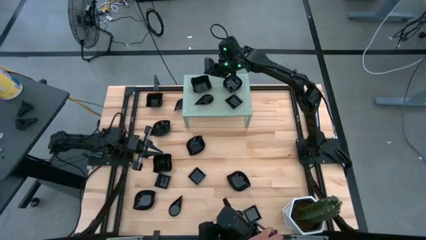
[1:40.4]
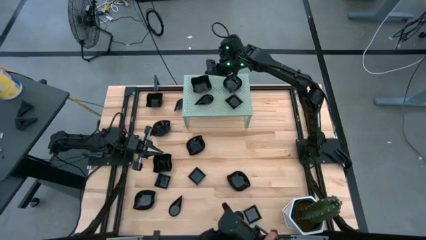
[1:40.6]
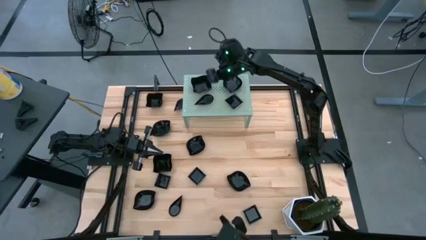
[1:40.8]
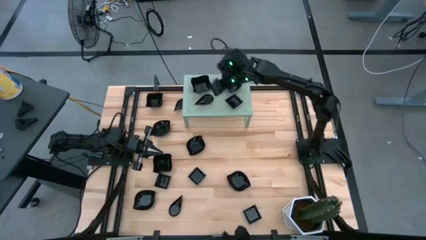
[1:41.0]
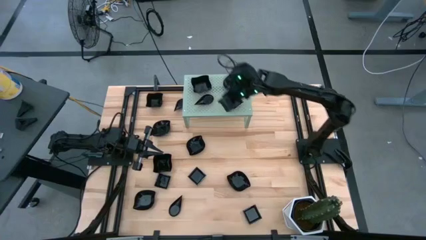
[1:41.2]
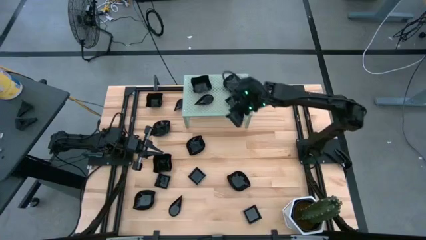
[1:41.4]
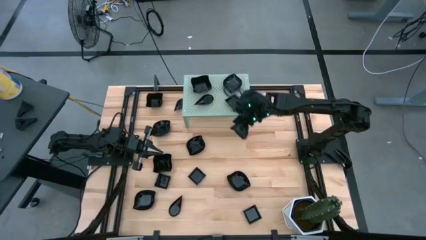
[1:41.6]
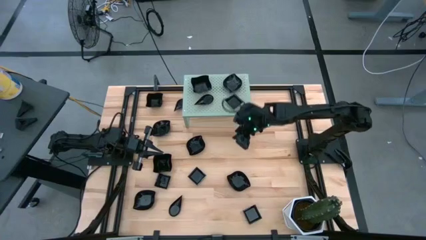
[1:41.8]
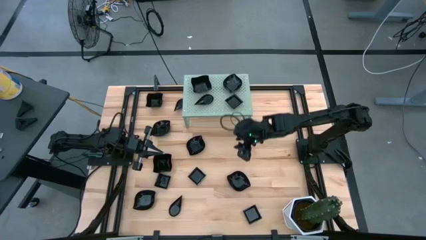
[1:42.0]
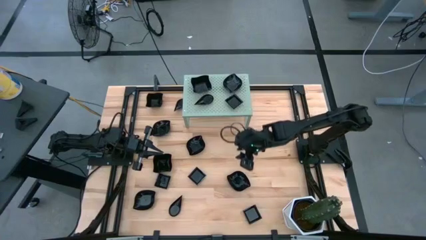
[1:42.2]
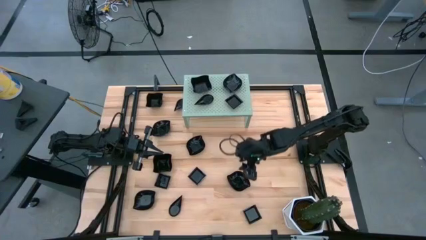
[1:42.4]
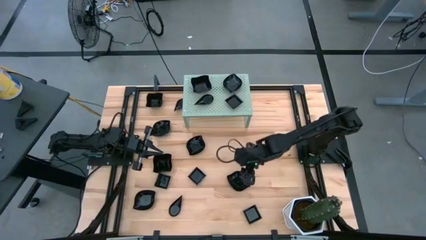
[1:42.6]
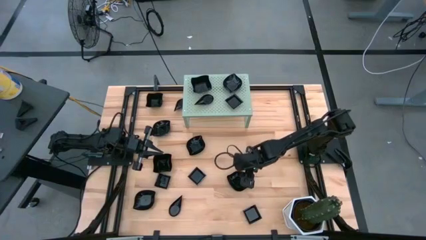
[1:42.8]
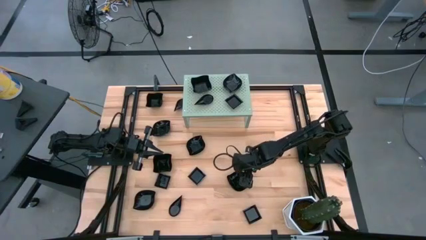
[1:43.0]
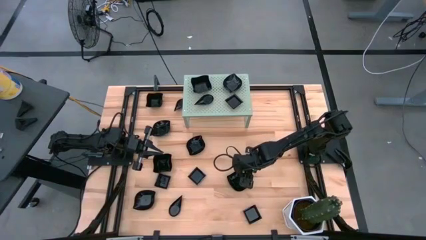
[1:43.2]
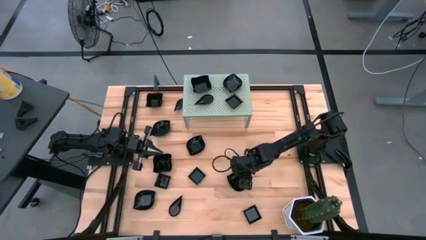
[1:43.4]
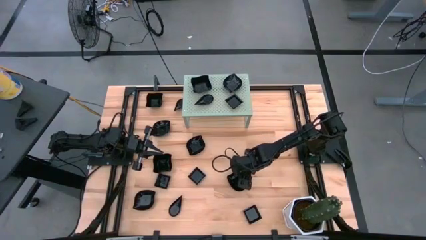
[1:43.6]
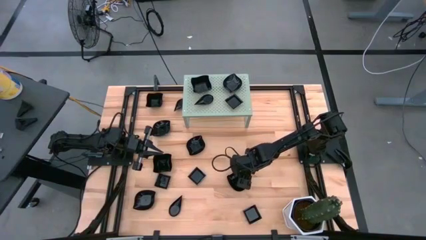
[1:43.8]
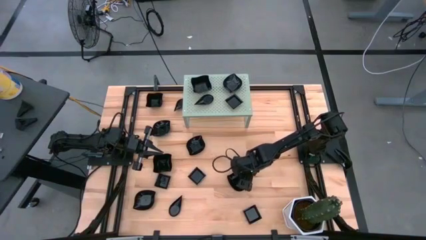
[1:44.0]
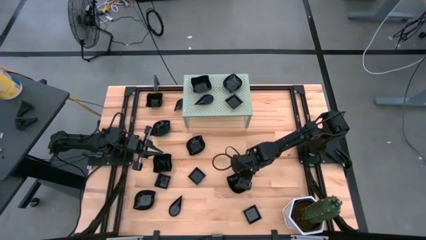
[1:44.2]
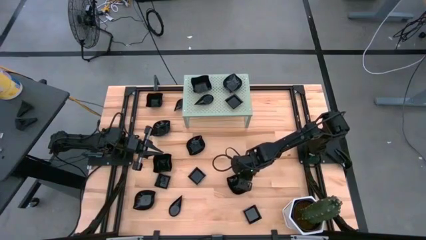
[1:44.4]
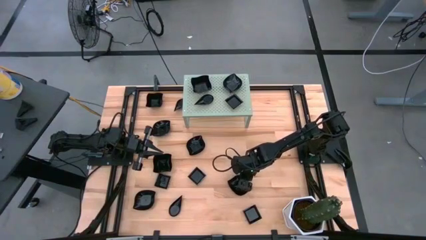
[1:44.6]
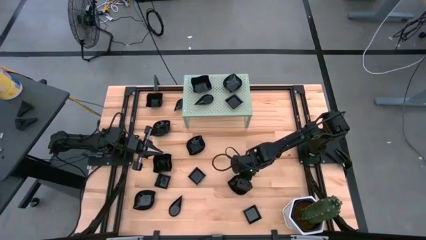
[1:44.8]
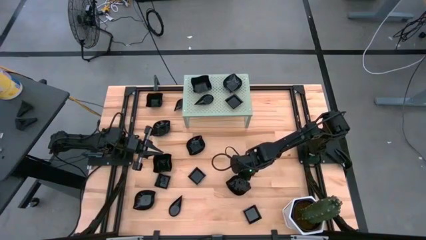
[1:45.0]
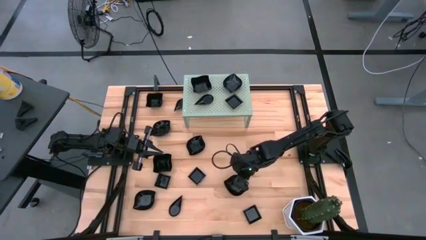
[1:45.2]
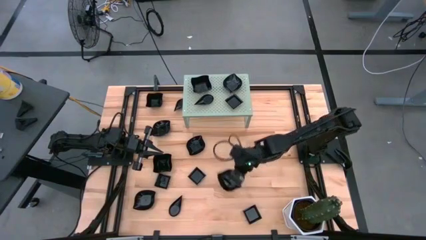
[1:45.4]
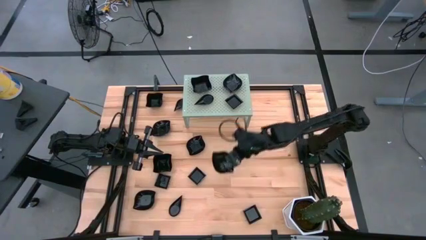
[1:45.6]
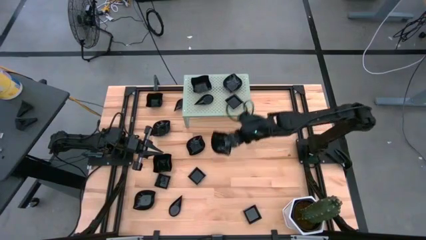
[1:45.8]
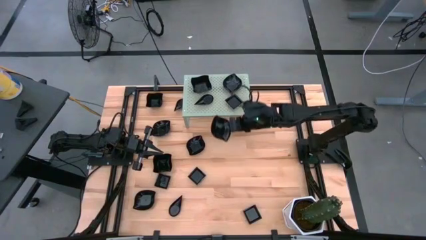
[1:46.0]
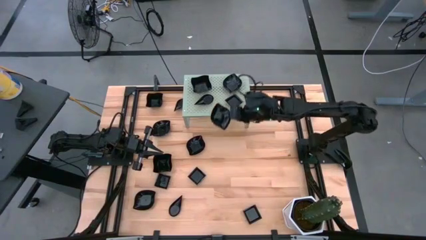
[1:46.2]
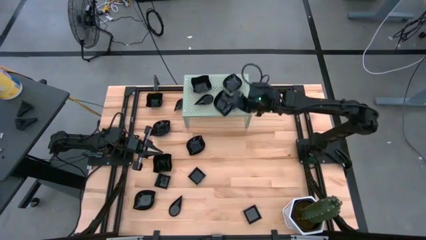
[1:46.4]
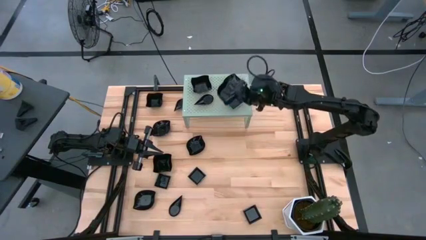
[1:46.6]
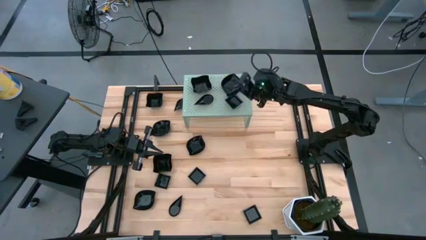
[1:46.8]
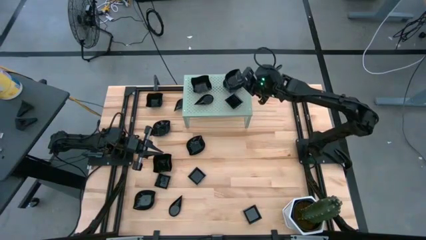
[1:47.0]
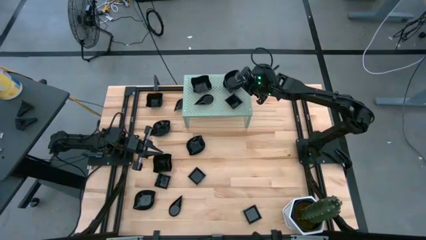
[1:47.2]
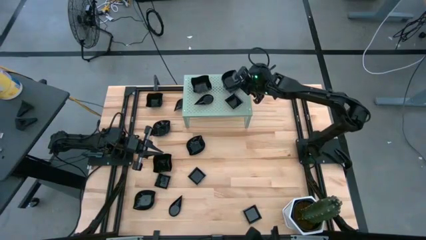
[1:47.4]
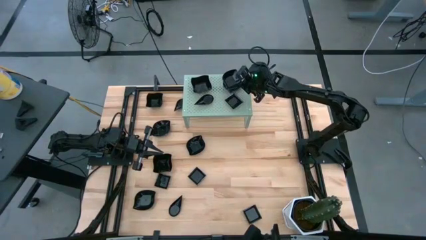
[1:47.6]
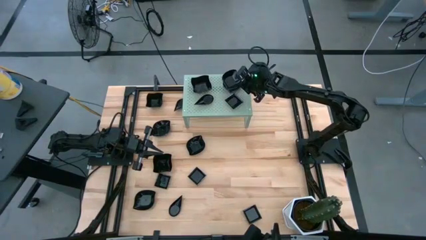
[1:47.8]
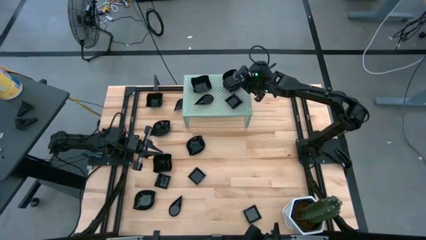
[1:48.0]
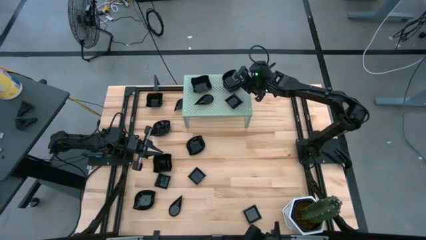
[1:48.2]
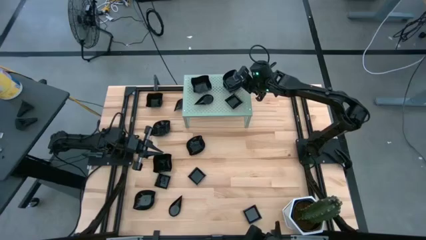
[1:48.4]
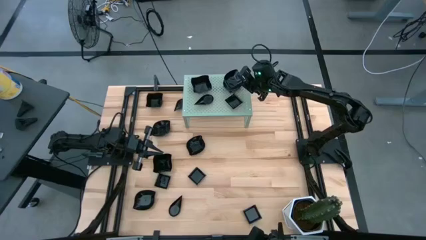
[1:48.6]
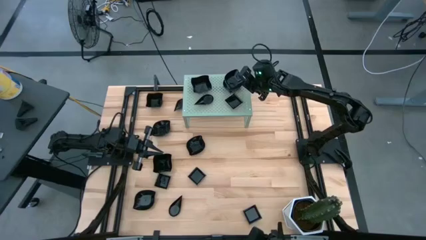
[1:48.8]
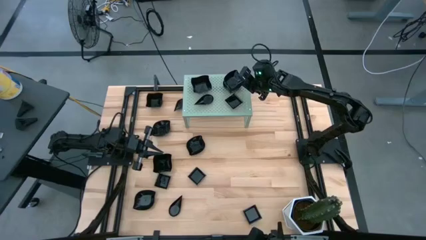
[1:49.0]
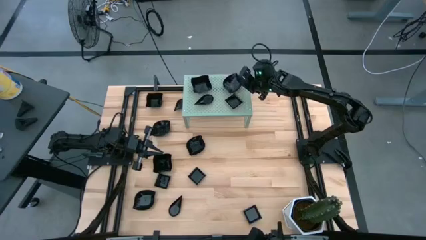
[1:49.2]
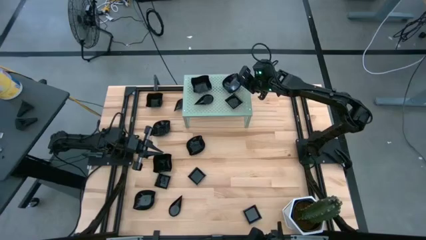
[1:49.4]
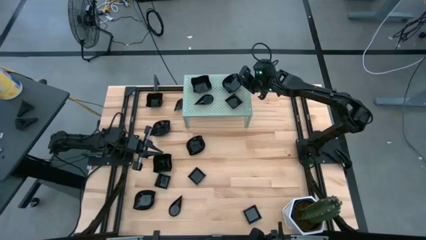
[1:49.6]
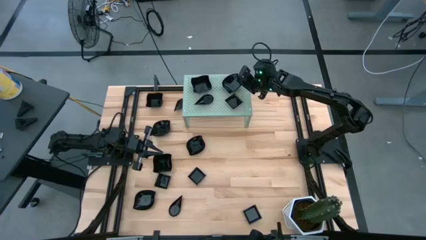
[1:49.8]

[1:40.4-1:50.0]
Task: Pick & Place Mini shaped plates
Stack the leaf shaped plate on top of the leaf shaped plate on the shelf

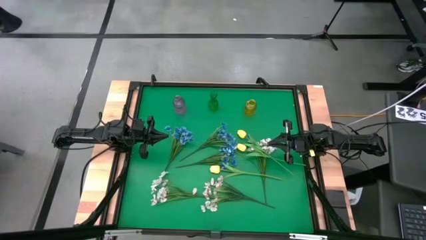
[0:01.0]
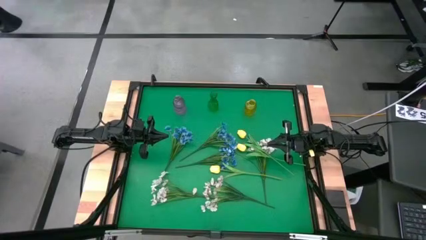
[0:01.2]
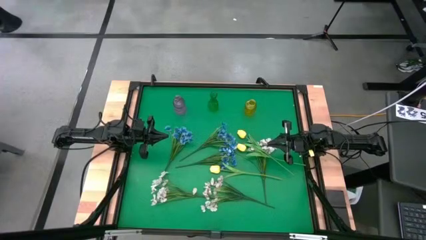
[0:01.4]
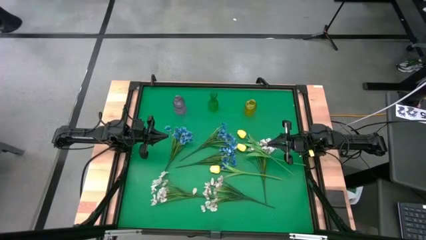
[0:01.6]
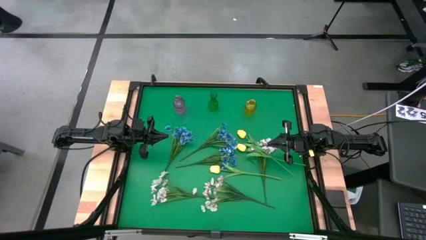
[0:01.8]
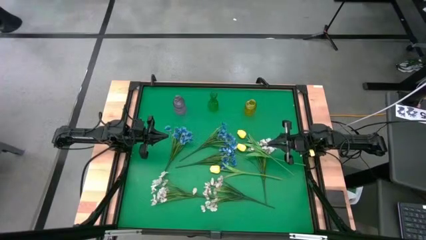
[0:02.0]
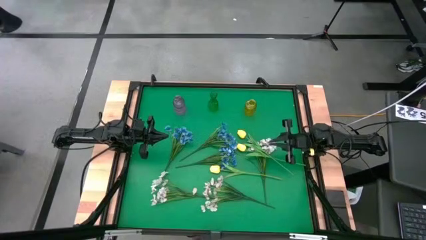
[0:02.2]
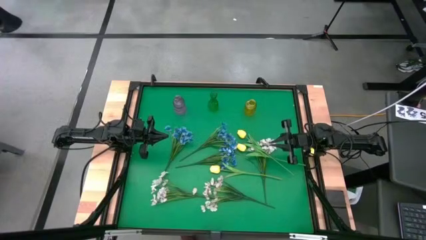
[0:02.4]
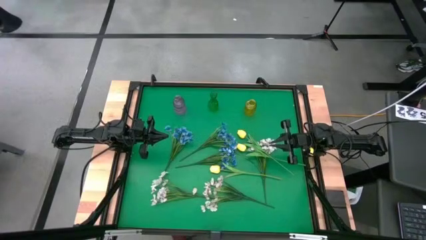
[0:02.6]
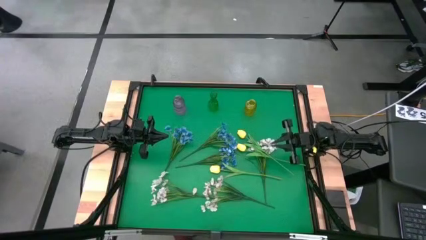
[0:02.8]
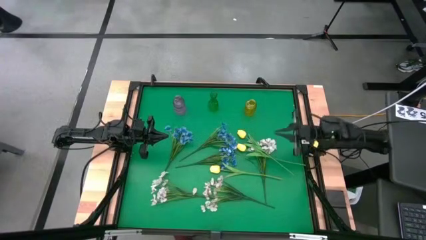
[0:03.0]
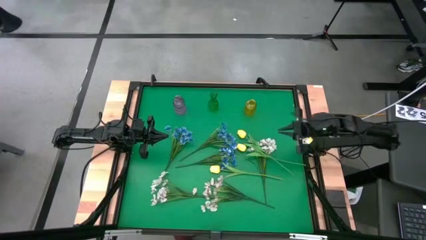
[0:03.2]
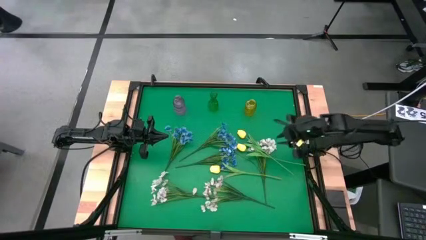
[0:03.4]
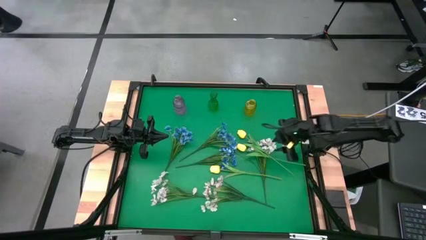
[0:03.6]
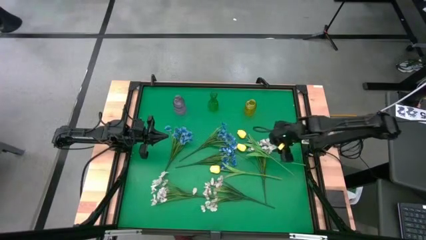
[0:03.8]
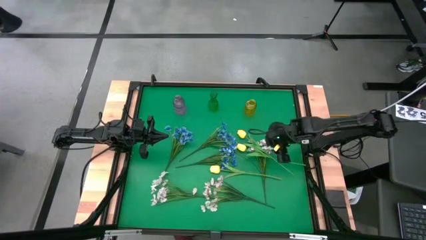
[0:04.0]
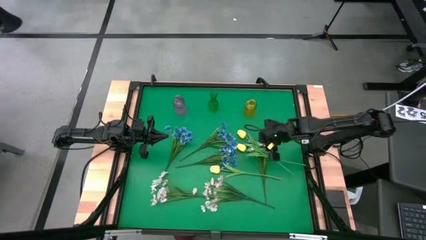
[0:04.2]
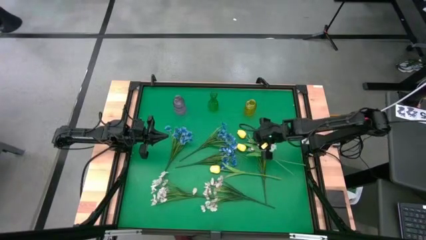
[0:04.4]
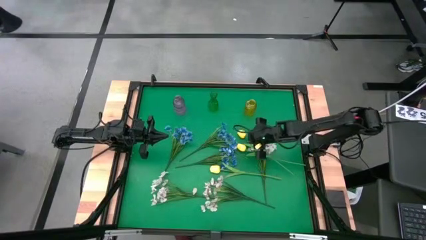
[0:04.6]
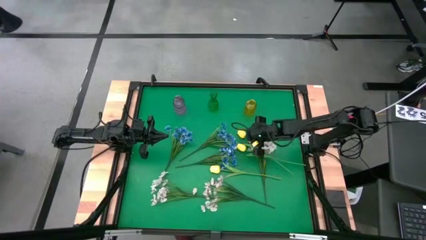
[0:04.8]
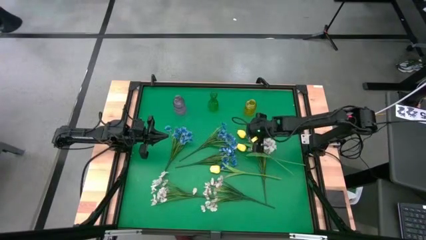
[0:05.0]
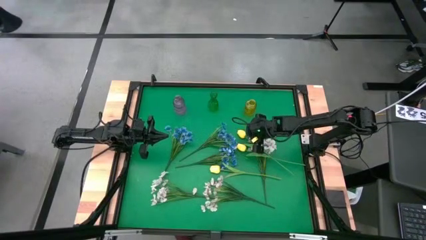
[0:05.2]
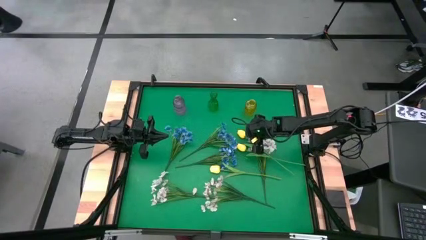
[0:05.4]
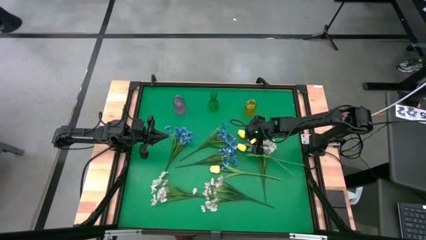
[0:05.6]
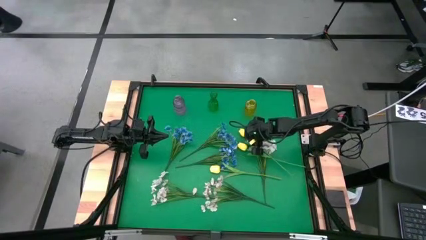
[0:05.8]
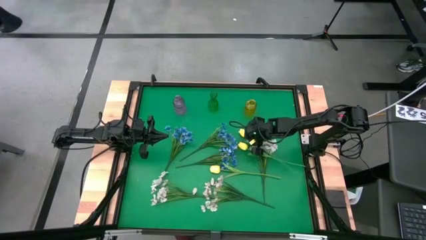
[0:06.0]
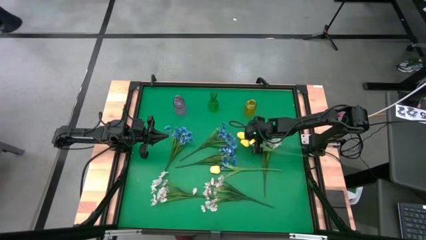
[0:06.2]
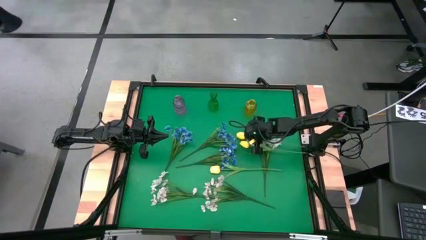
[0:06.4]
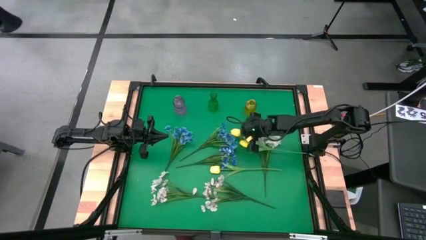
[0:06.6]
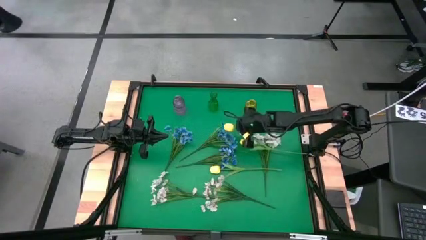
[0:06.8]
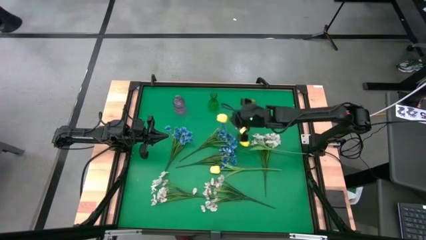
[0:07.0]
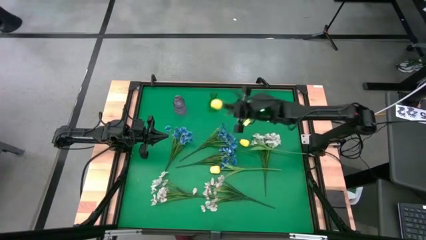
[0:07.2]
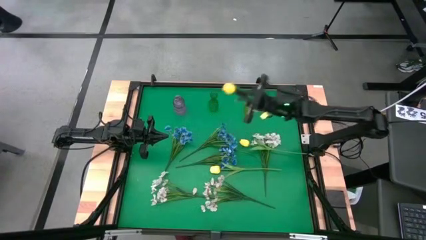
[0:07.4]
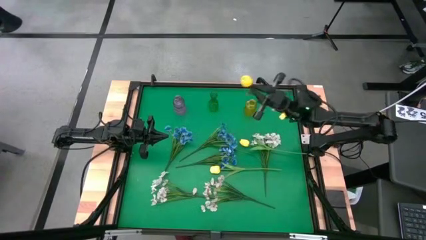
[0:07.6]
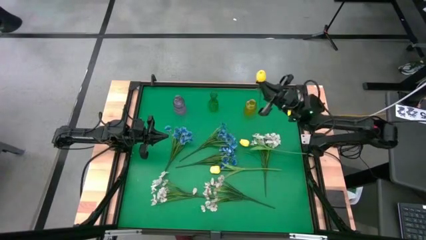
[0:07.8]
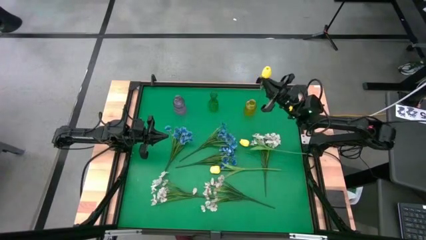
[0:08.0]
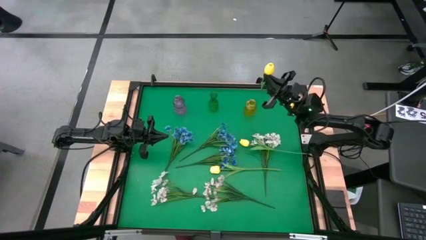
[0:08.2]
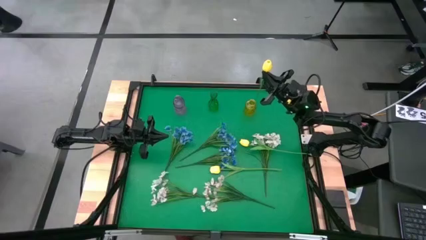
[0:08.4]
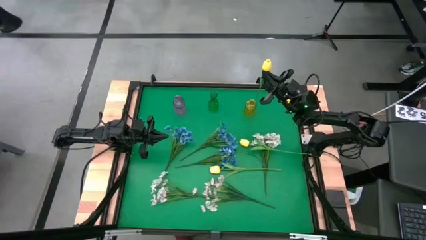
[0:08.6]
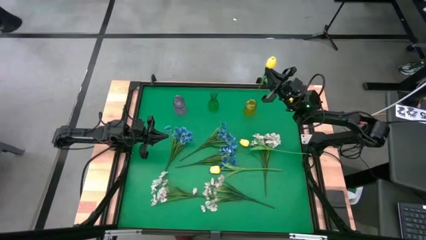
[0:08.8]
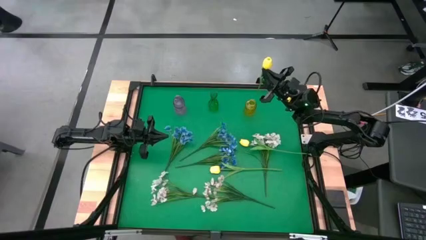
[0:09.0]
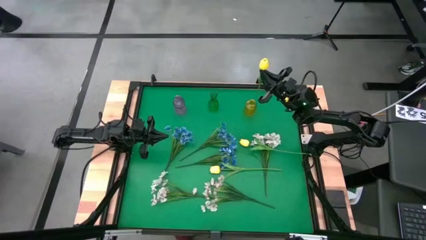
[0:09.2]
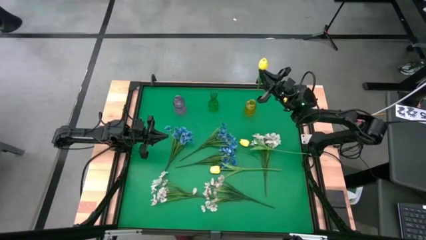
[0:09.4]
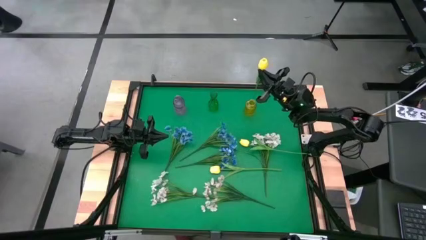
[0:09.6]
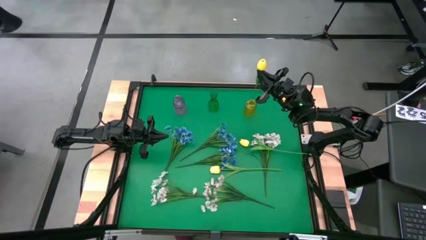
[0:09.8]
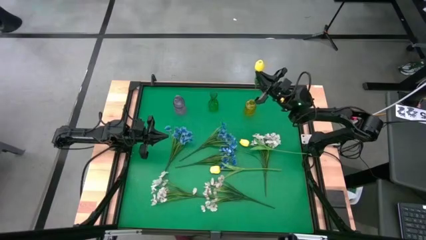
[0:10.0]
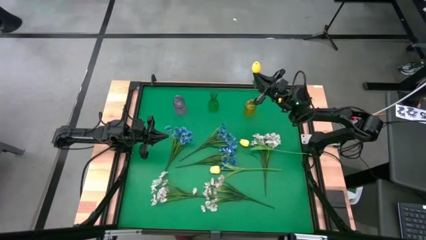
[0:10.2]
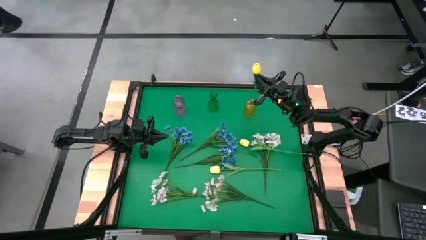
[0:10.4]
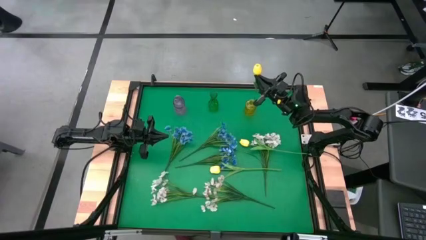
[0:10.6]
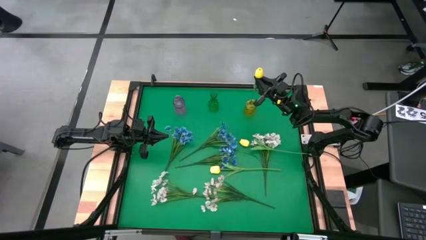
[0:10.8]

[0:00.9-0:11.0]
Task: Sort flowers into vase by color
Put the top yellow flower into the yellow vase
